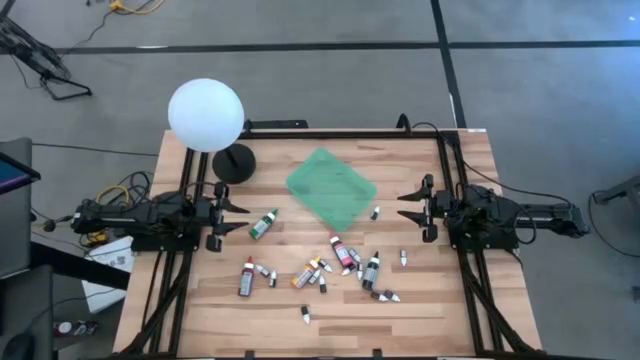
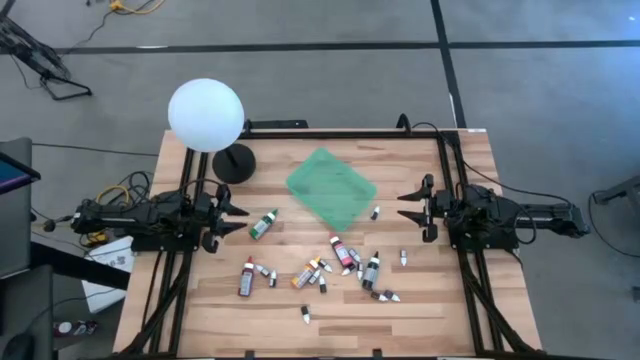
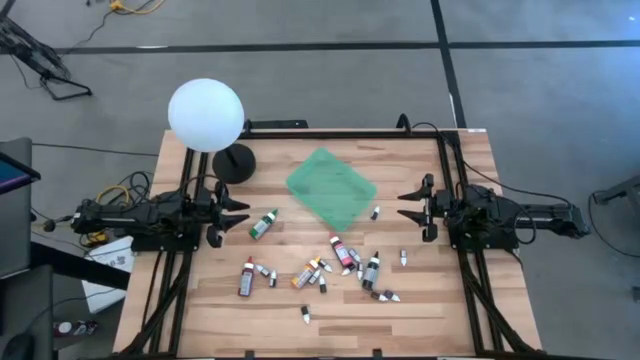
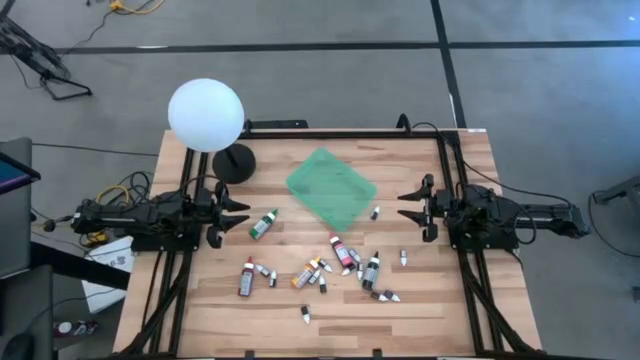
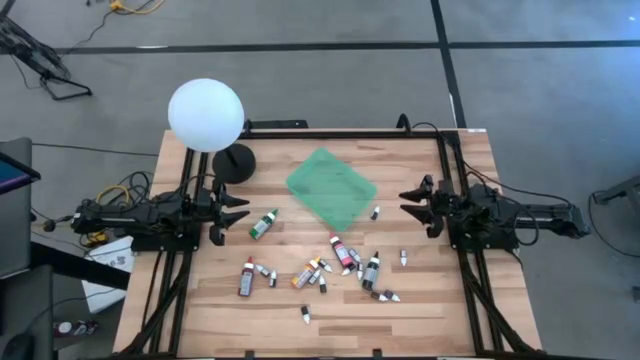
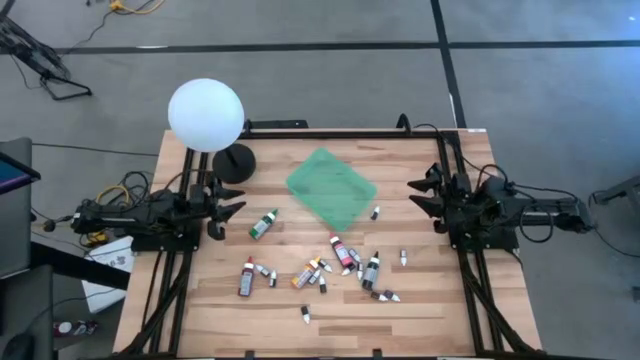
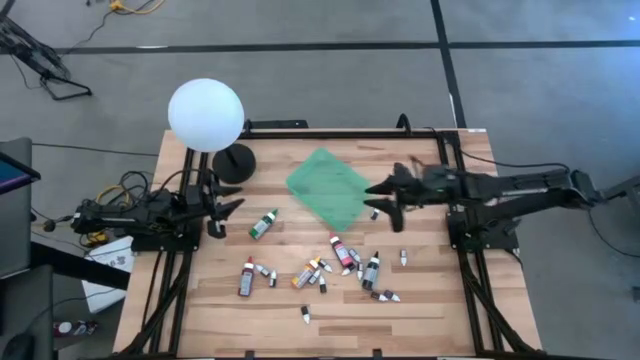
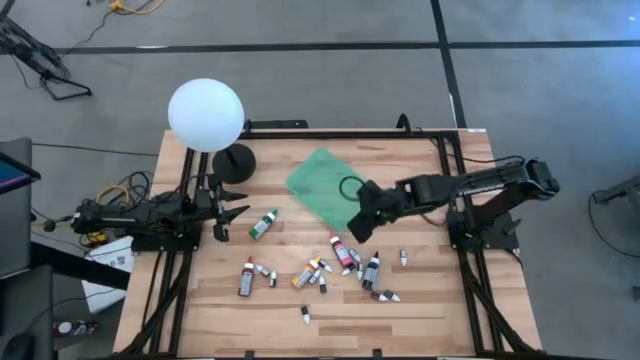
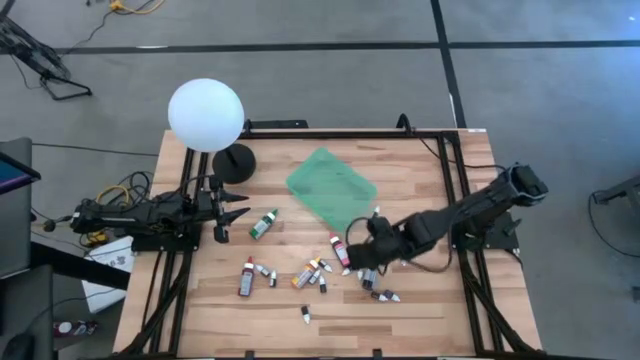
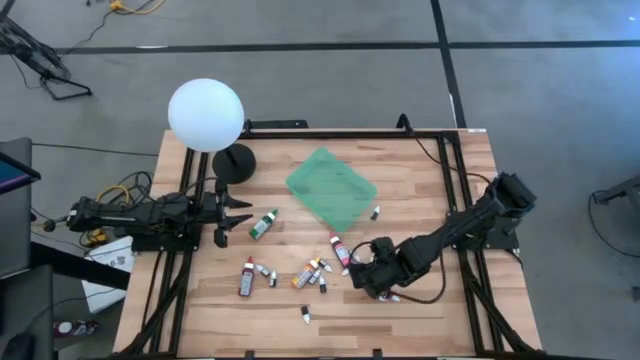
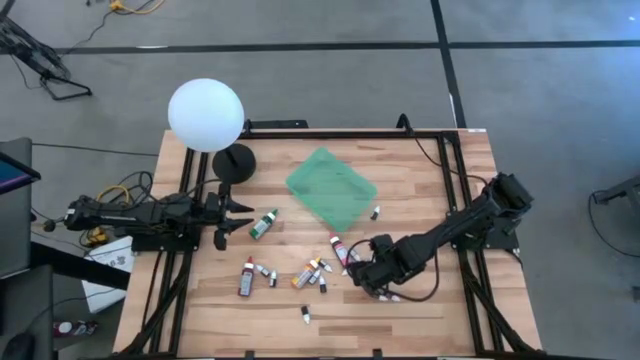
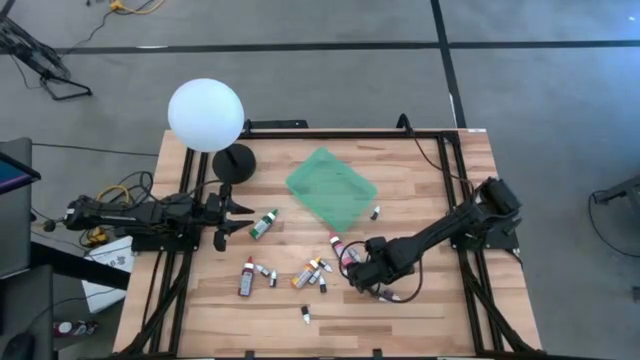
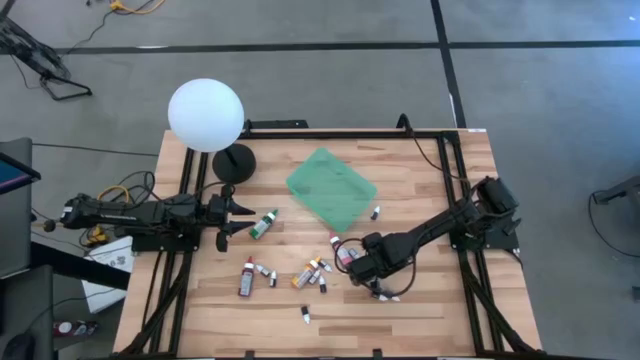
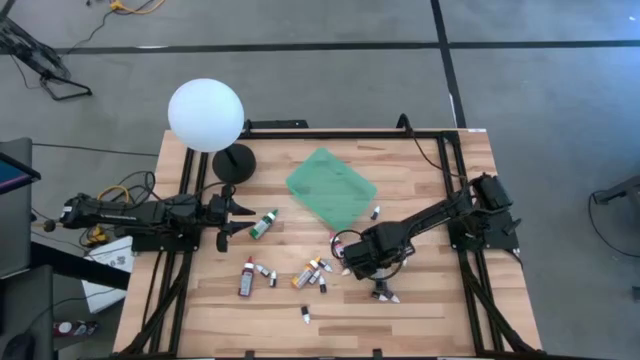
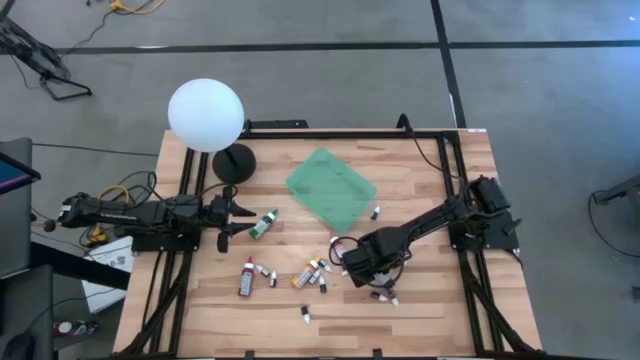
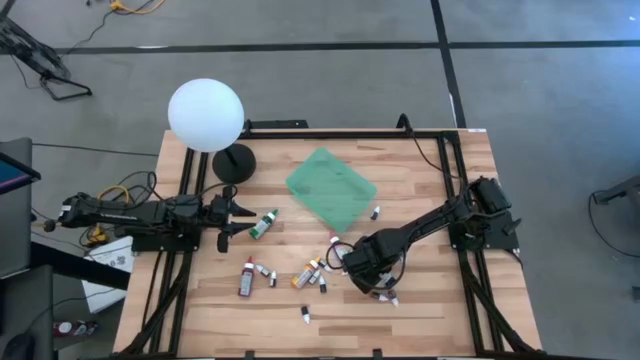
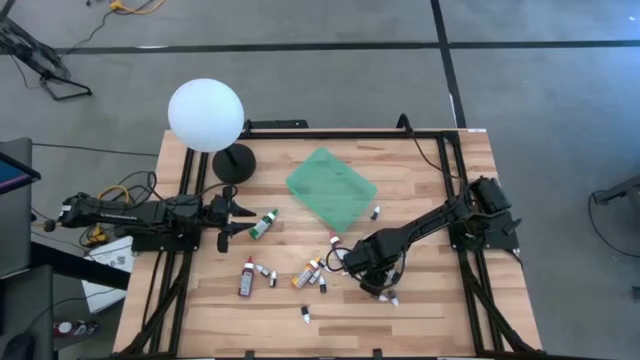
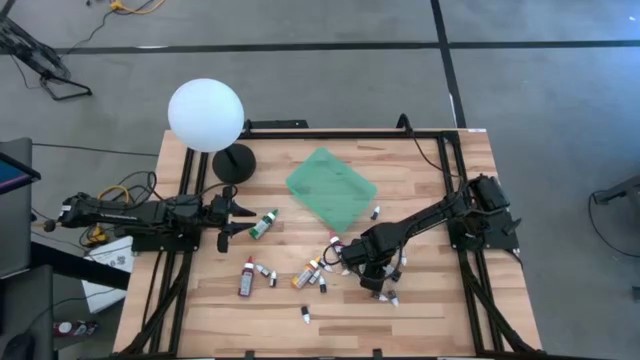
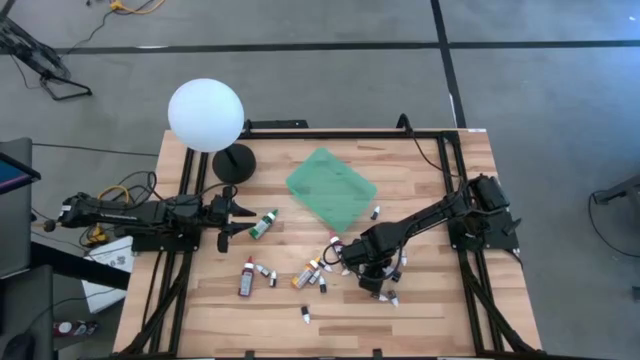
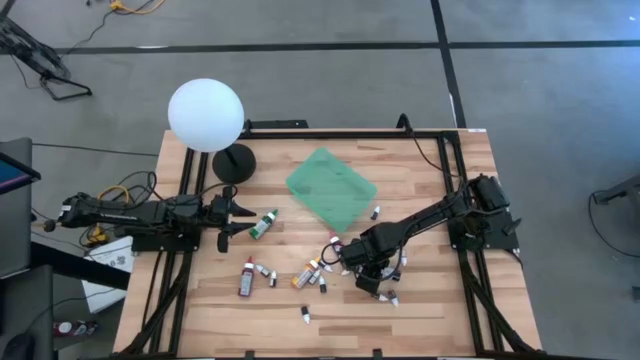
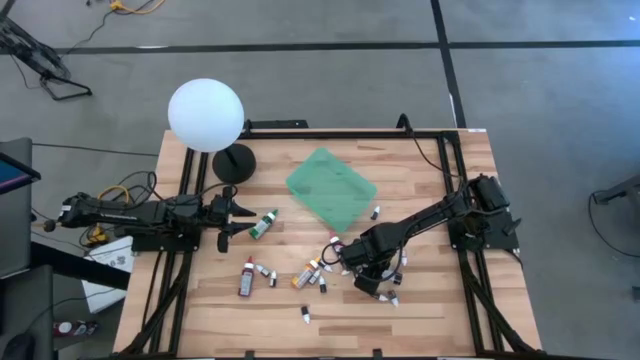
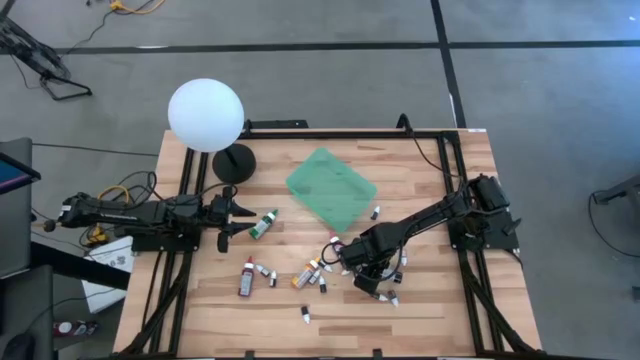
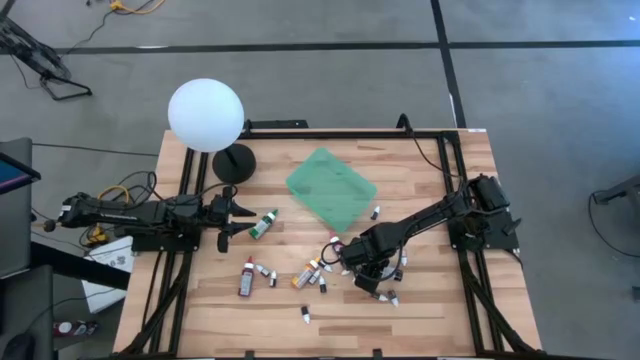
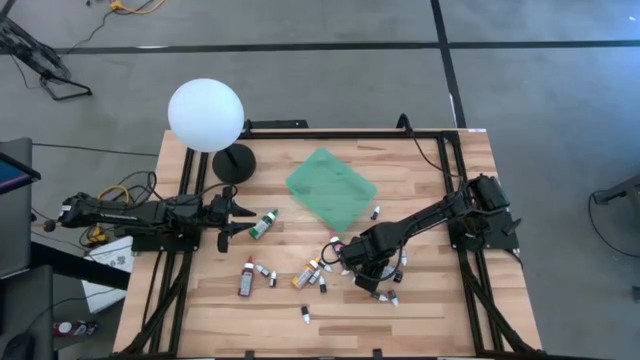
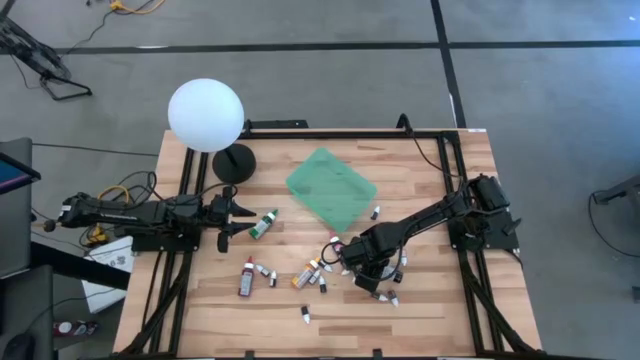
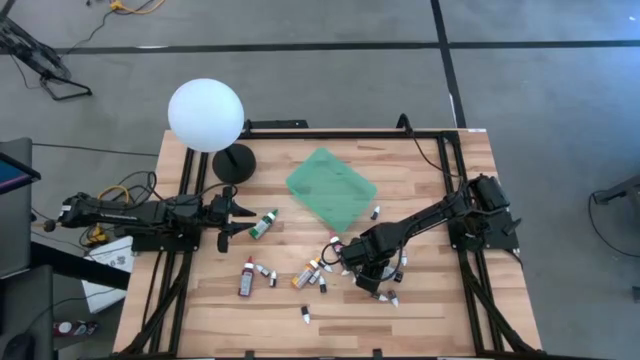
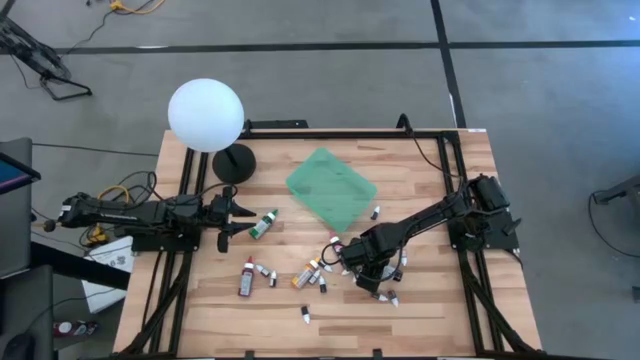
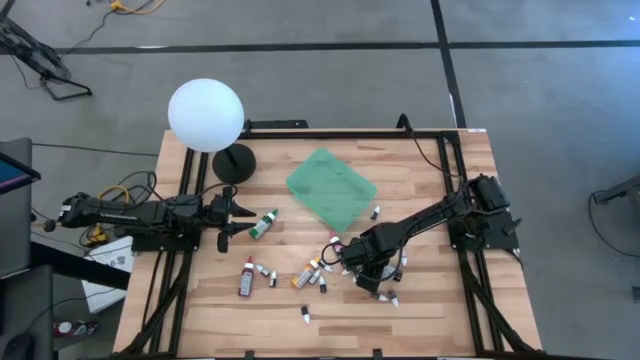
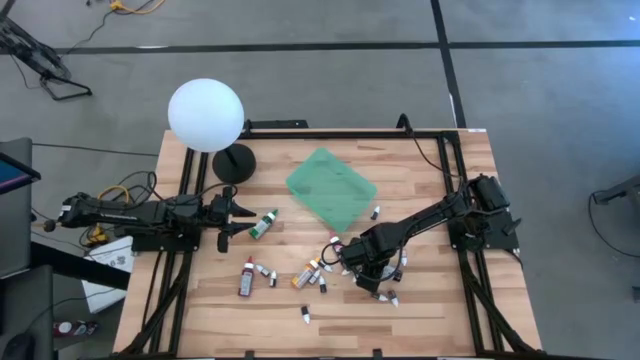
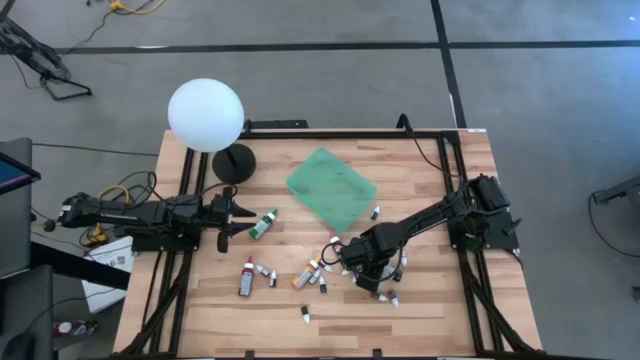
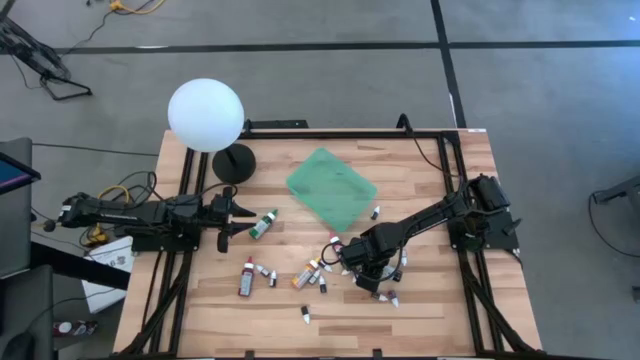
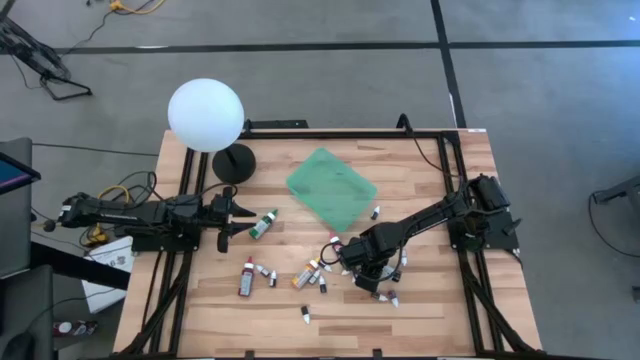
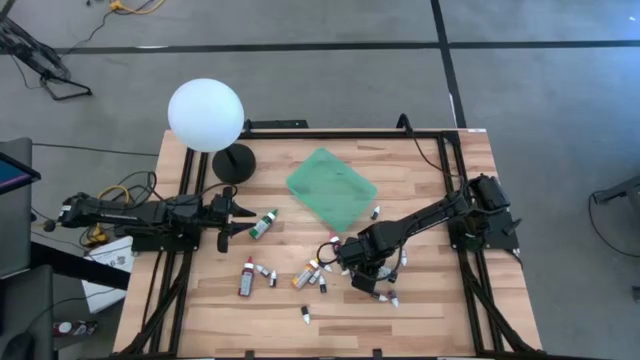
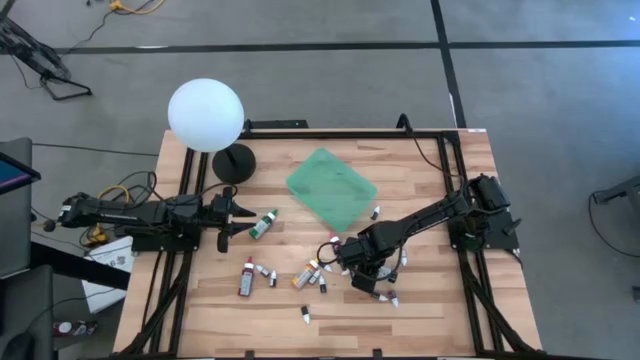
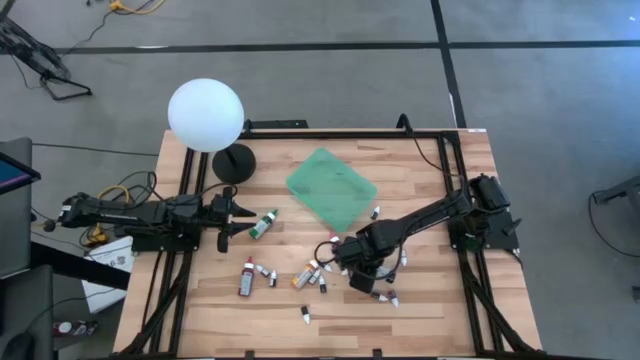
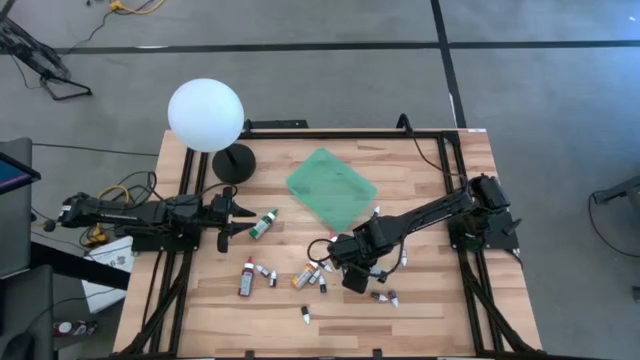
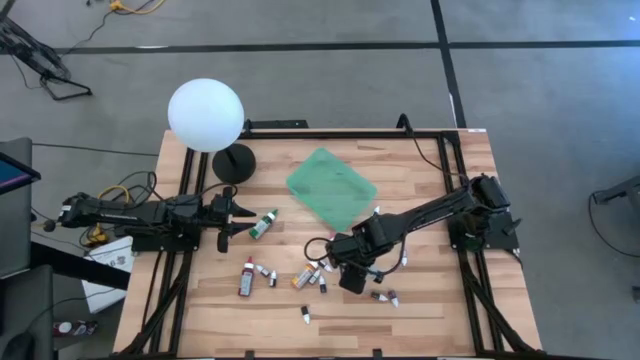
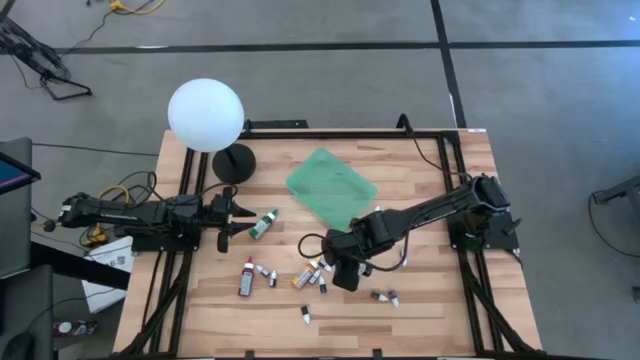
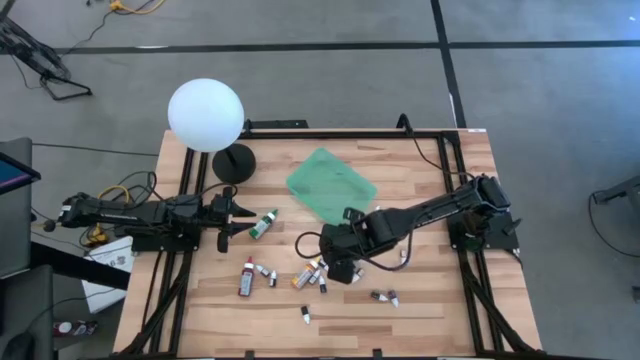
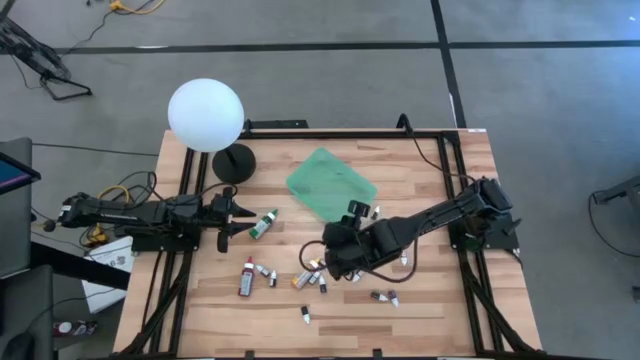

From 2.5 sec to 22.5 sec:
Task: Pick & Place food coloring
Put the large black food coloring bottle into the green bin
